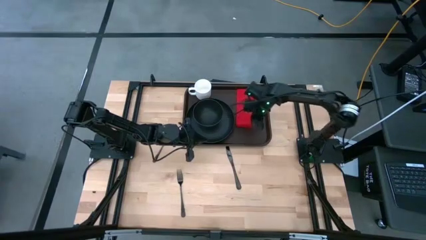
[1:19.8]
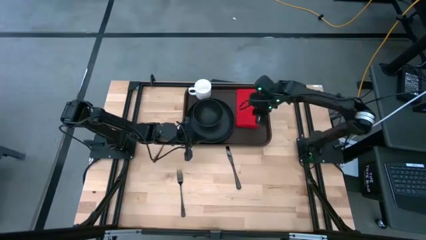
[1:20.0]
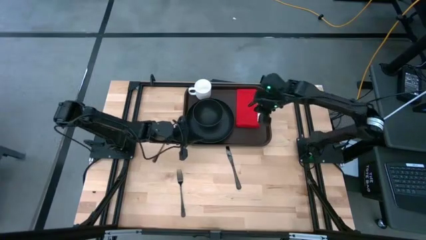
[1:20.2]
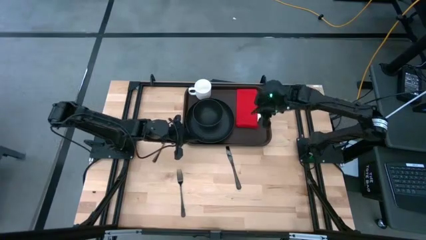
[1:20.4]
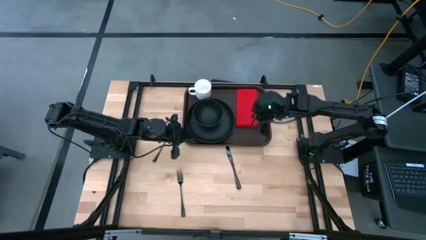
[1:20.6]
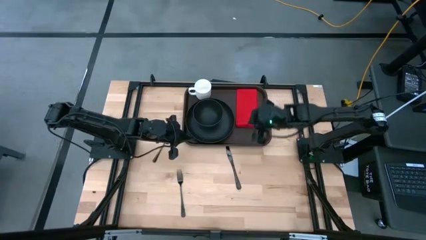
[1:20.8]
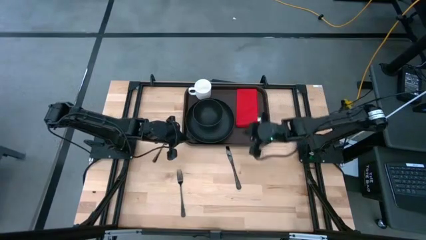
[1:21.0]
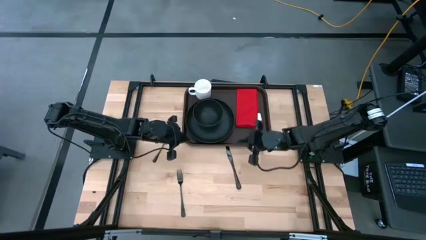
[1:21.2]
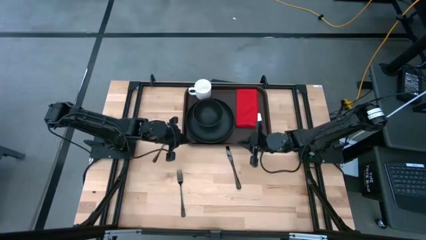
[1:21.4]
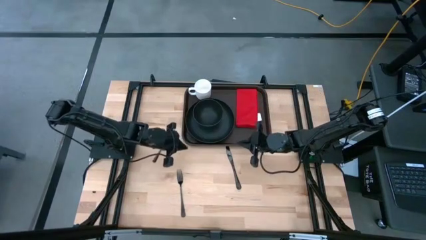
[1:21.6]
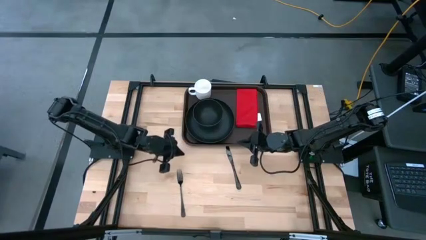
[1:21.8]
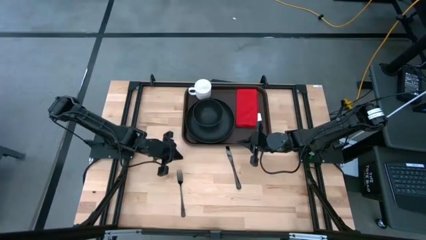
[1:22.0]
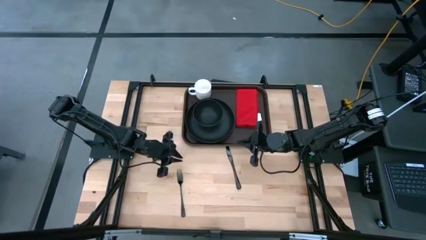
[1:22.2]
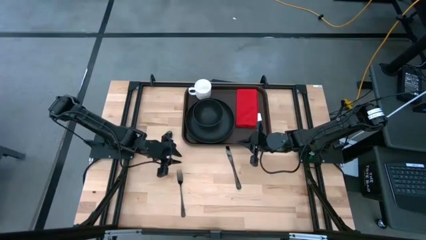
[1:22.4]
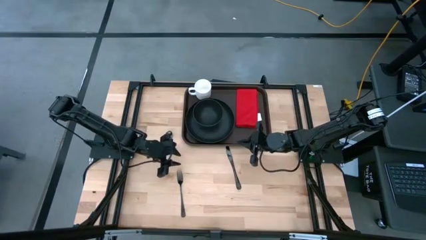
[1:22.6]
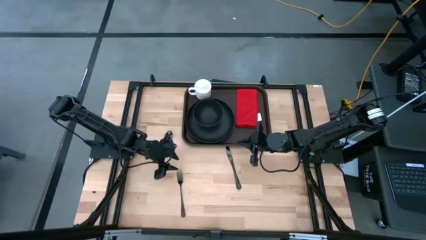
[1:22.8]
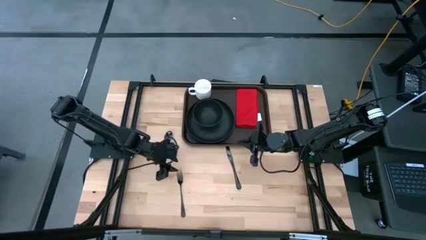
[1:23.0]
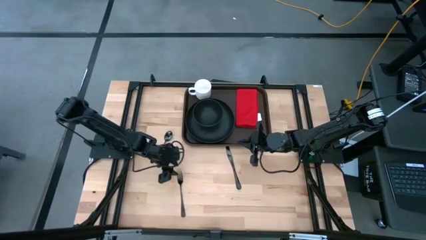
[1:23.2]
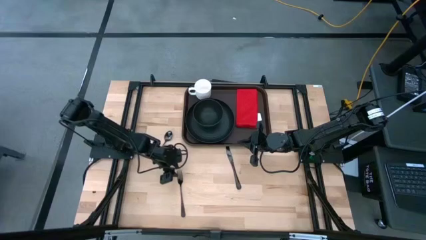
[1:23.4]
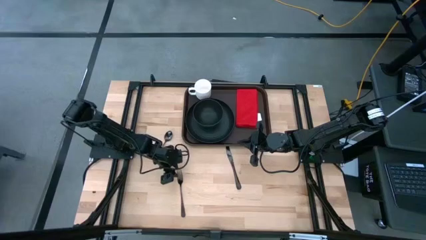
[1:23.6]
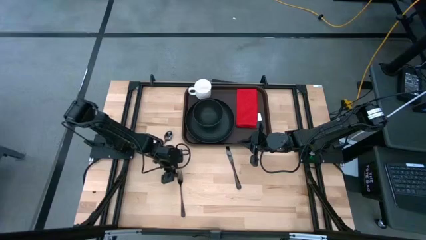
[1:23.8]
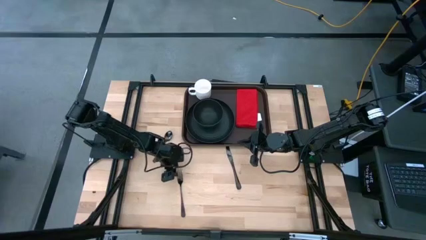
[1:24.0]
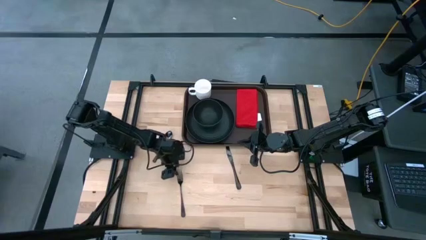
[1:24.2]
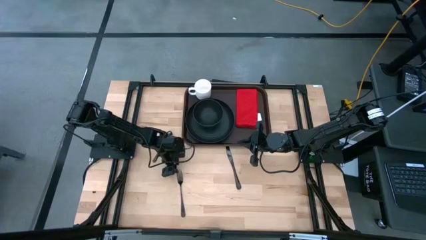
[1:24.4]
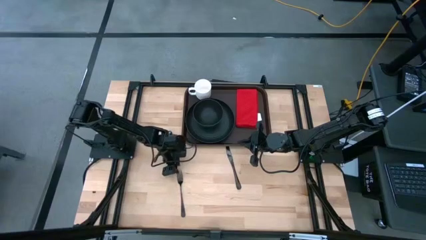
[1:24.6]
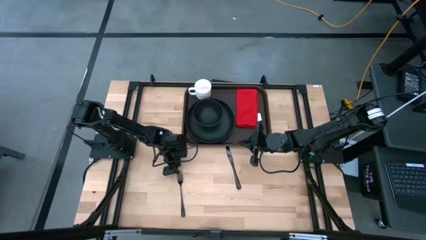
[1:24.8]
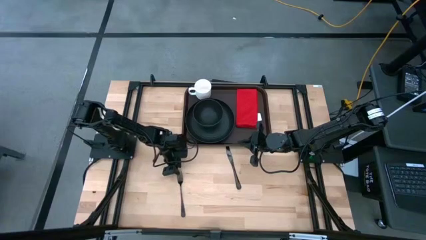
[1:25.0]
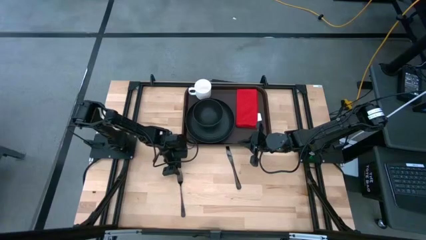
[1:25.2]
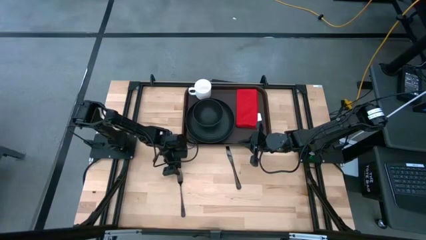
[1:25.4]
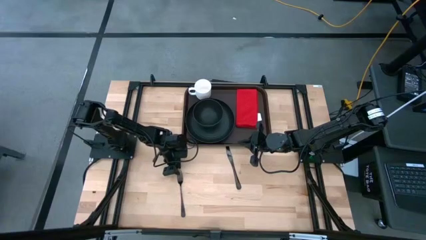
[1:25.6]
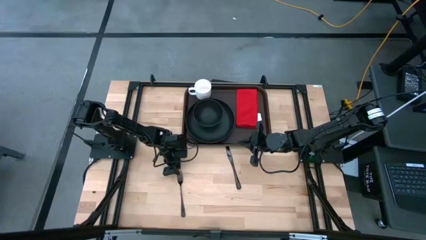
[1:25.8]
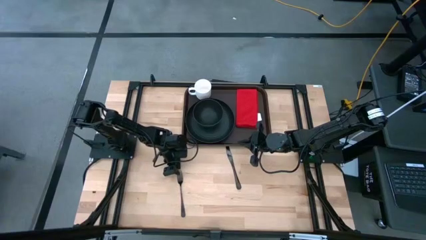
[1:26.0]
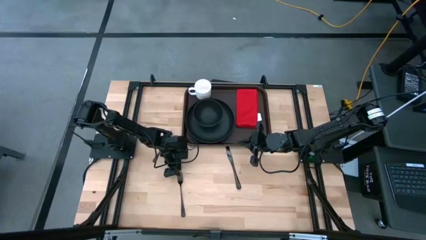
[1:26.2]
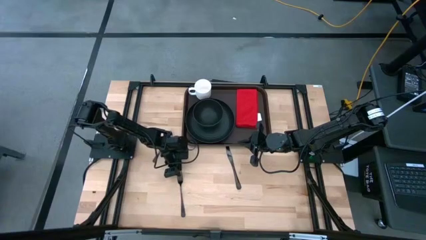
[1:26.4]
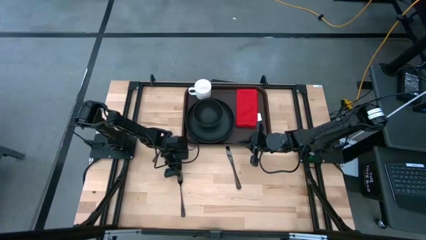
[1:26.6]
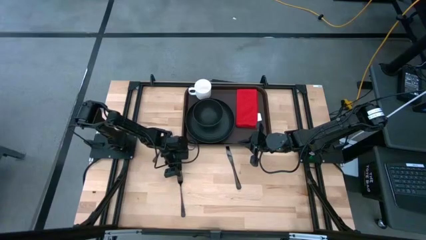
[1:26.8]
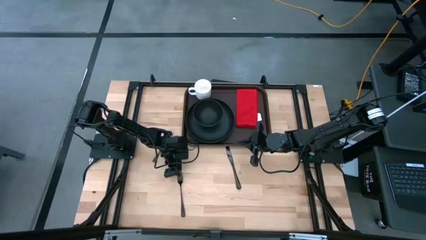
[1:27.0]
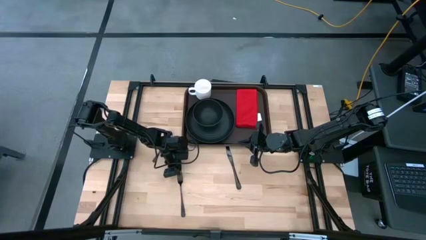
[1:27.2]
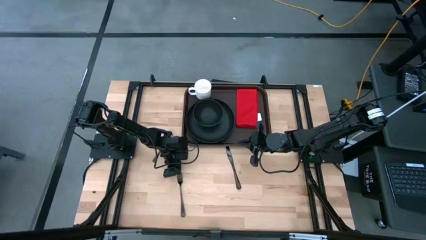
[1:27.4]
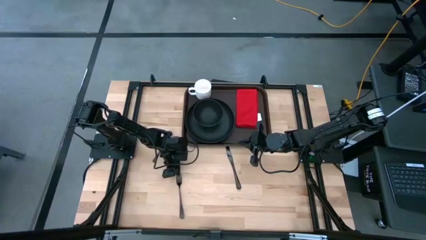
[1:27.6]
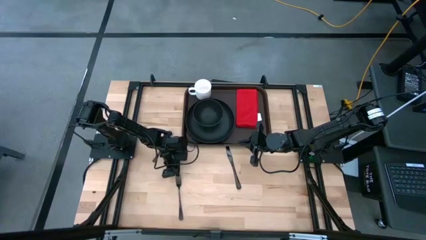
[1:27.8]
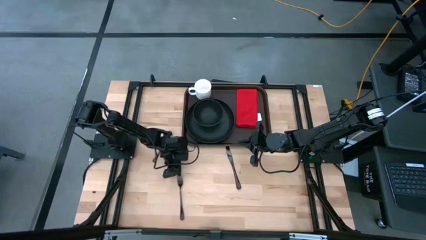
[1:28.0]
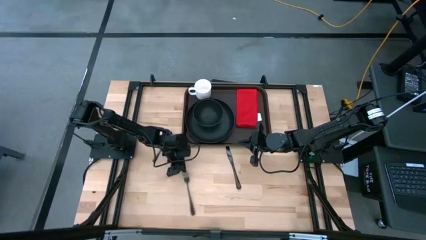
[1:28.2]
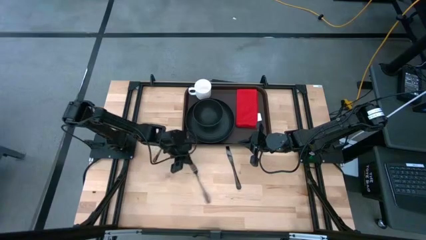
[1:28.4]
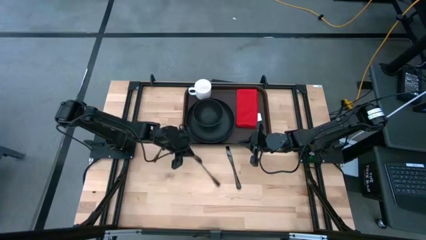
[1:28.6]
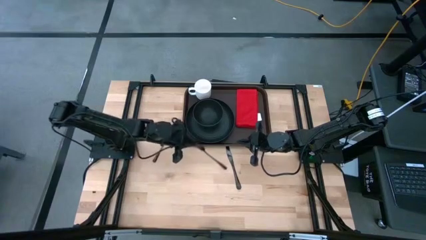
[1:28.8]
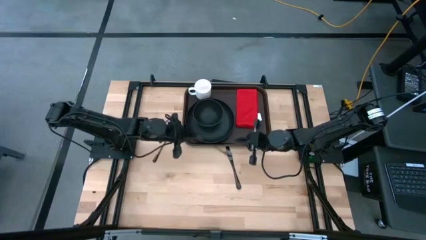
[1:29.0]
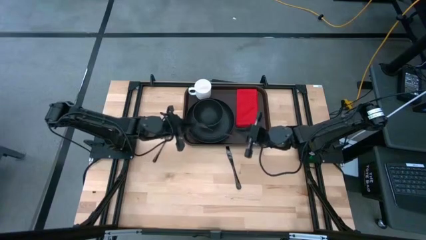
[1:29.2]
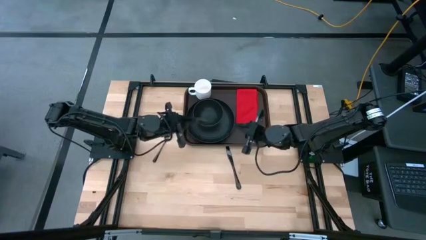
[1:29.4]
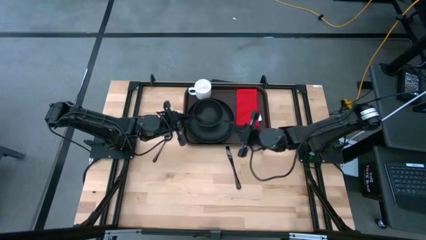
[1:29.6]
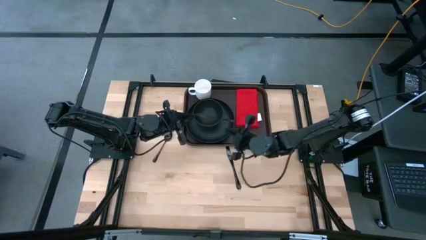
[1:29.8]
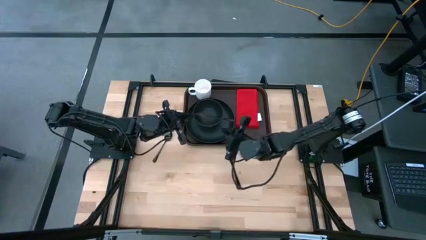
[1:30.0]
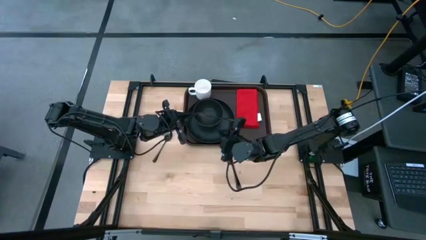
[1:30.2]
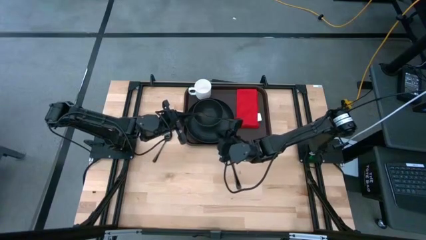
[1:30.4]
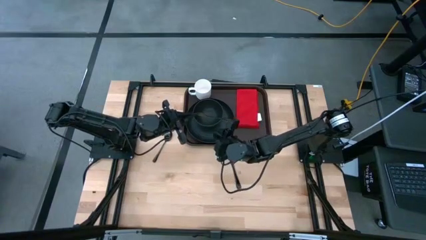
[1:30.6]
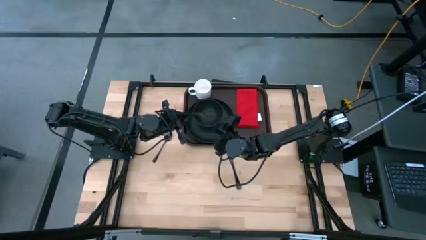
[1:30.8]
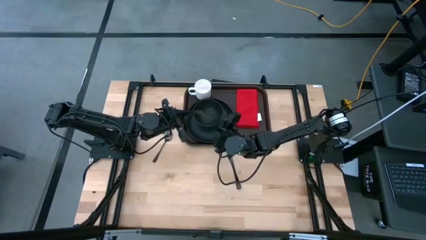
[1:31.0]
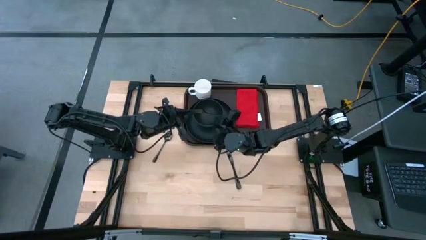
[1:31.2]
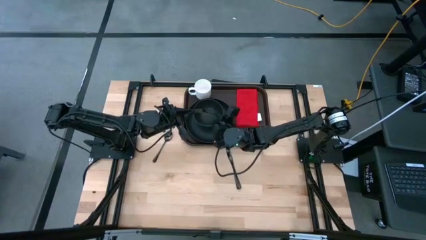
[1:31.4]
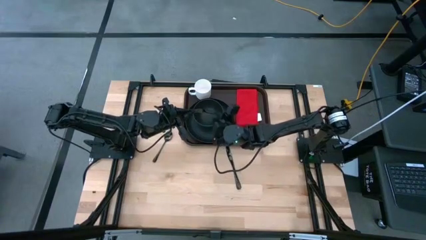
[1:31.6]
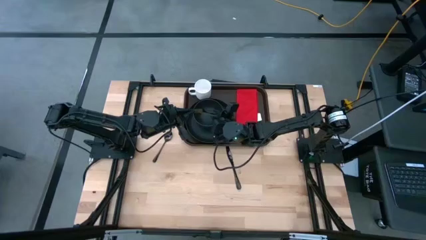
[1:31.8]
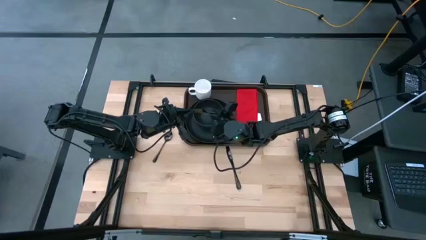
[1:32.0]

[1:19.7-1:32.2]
Task: Set up tray
Put the black fork on the red table napkin
